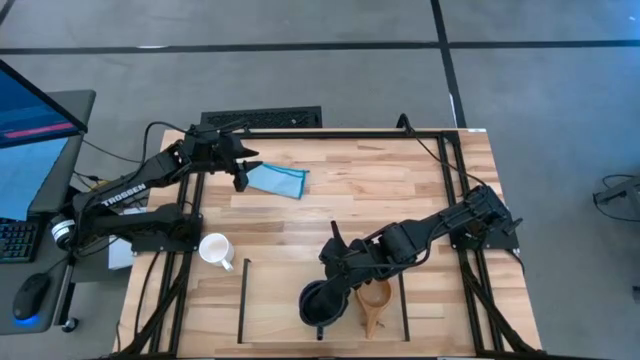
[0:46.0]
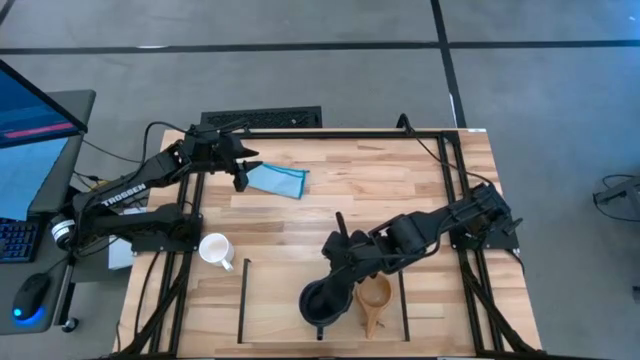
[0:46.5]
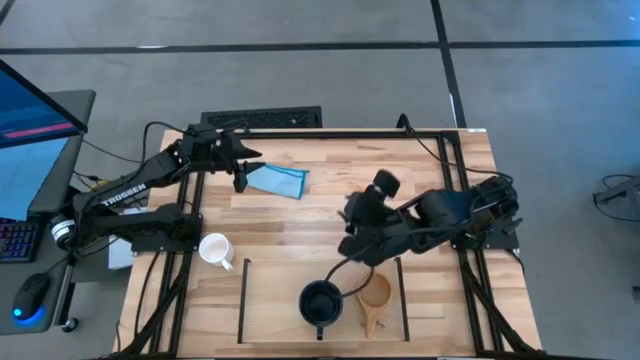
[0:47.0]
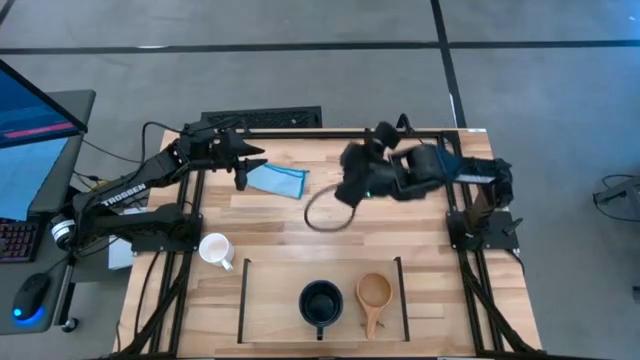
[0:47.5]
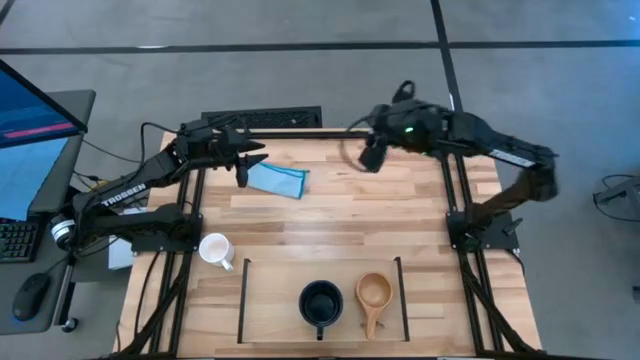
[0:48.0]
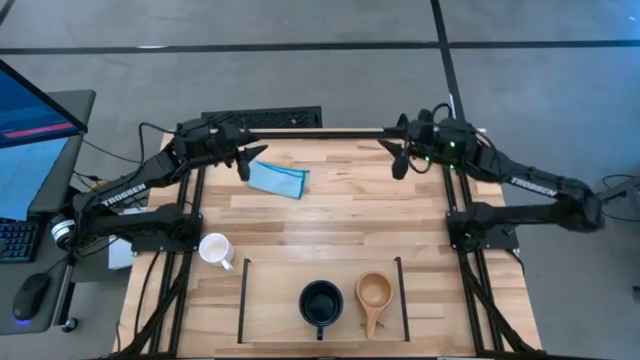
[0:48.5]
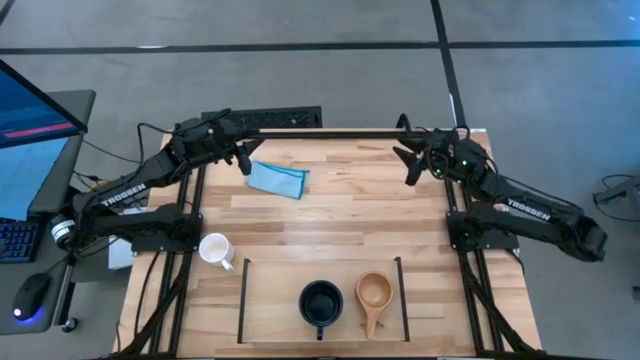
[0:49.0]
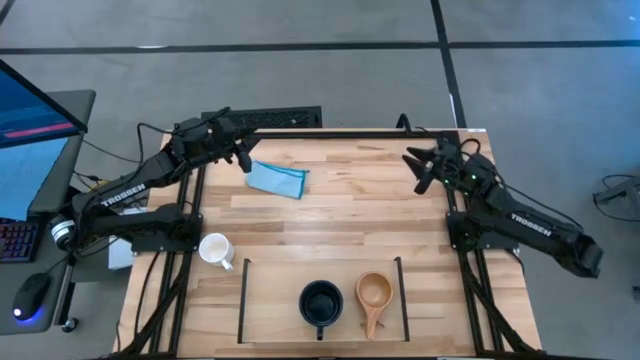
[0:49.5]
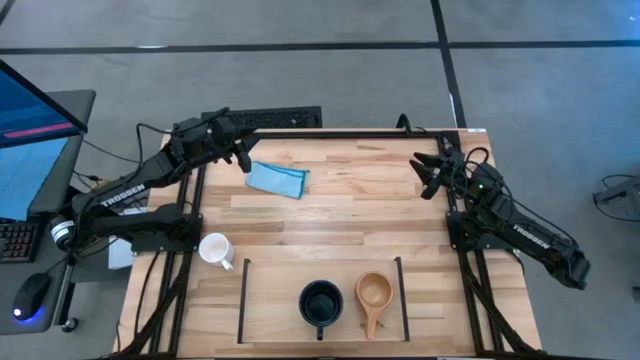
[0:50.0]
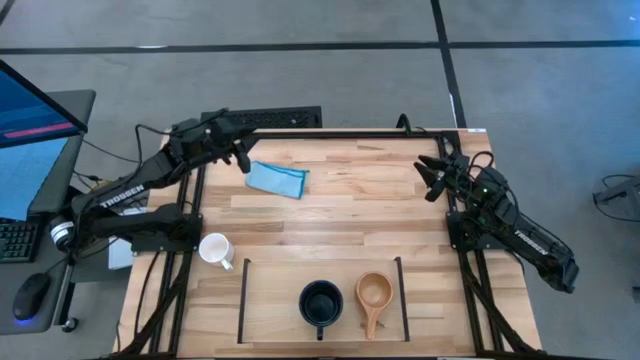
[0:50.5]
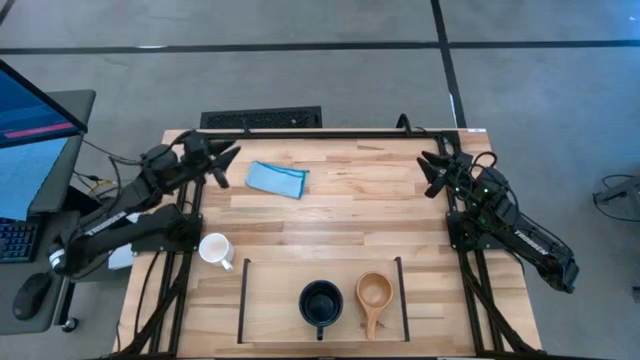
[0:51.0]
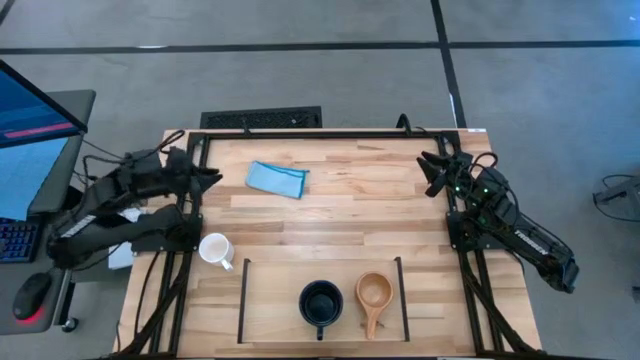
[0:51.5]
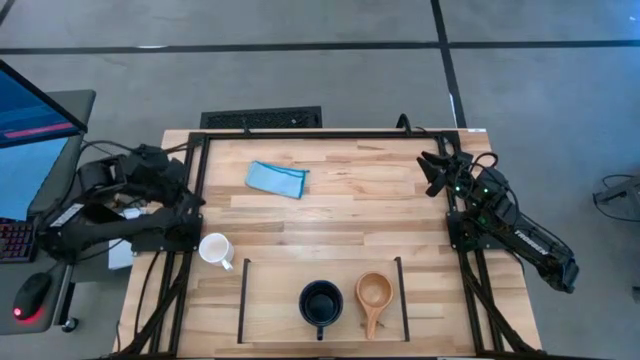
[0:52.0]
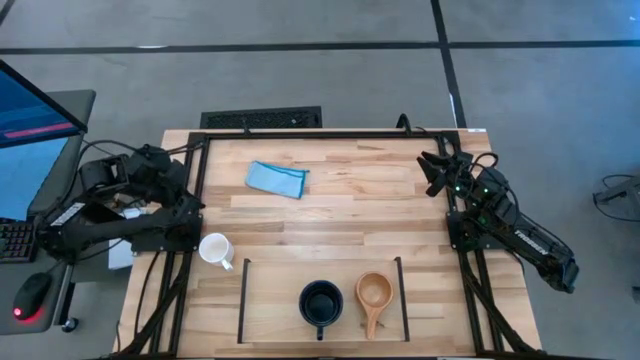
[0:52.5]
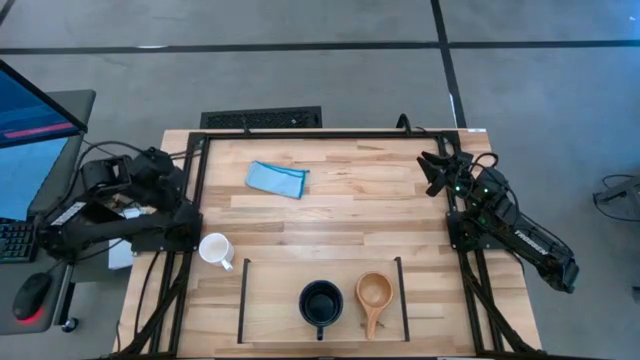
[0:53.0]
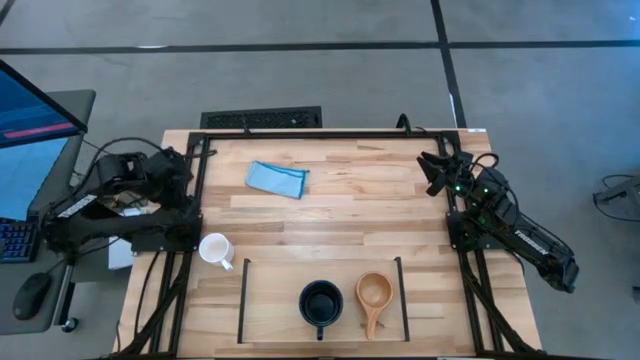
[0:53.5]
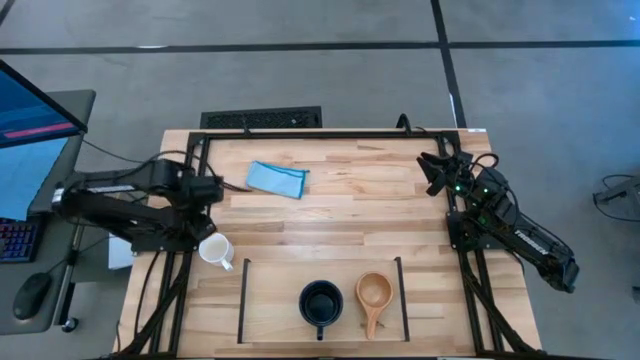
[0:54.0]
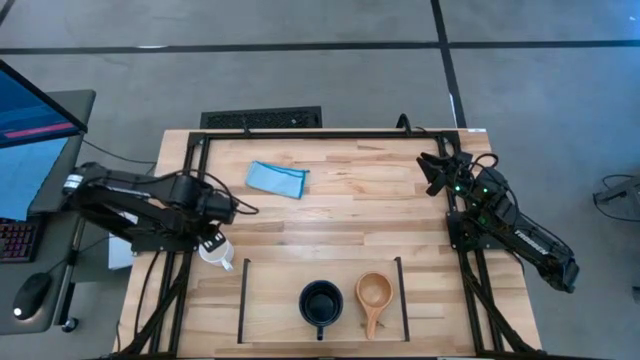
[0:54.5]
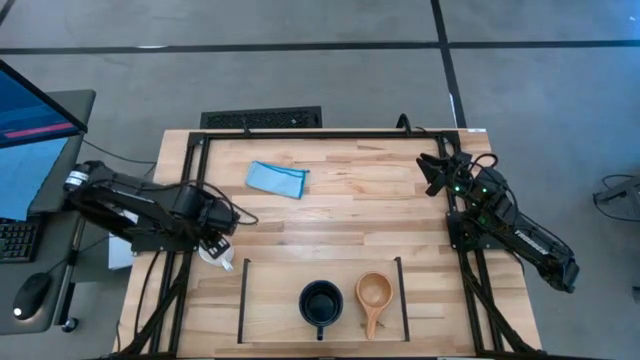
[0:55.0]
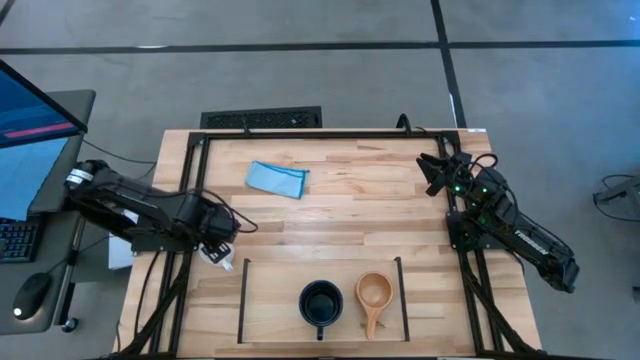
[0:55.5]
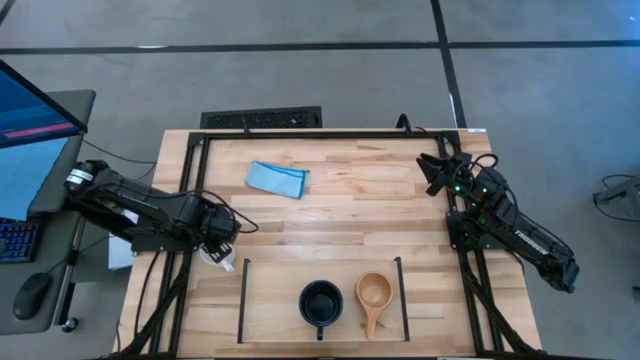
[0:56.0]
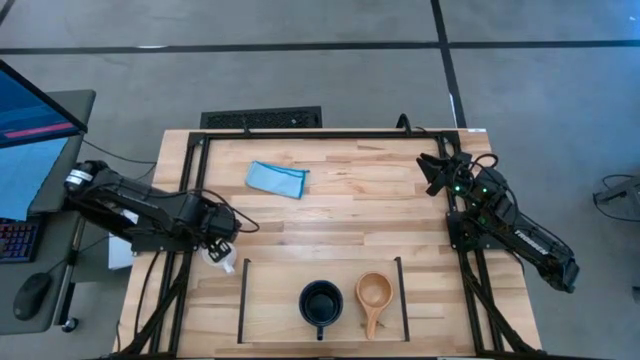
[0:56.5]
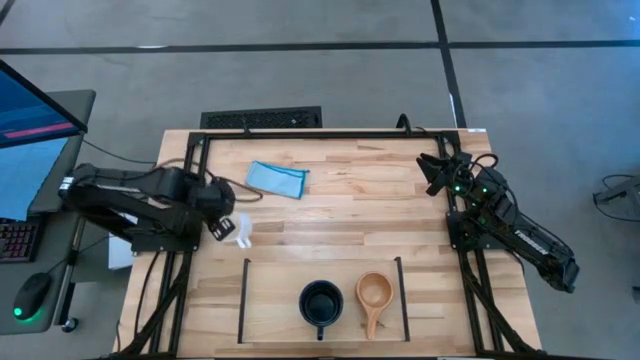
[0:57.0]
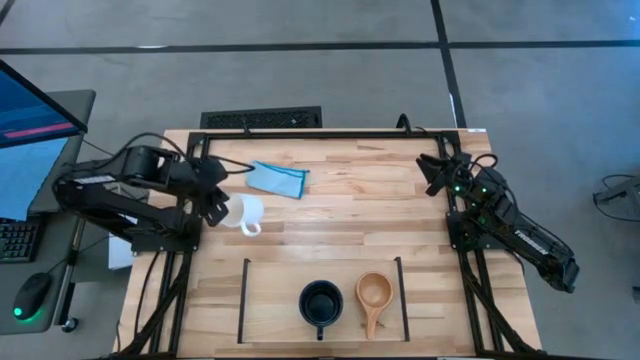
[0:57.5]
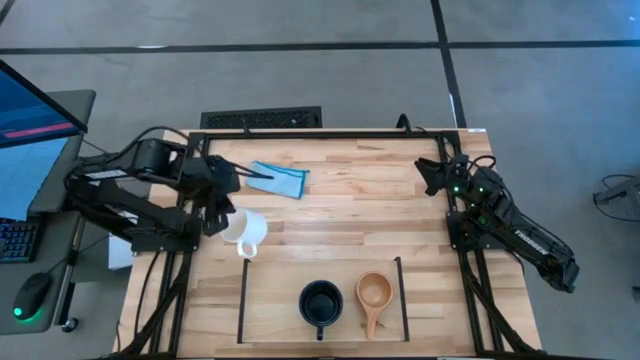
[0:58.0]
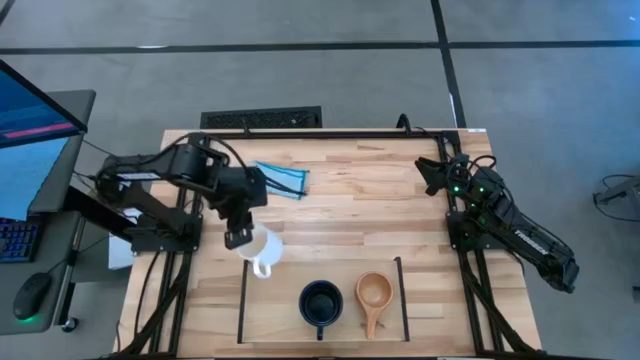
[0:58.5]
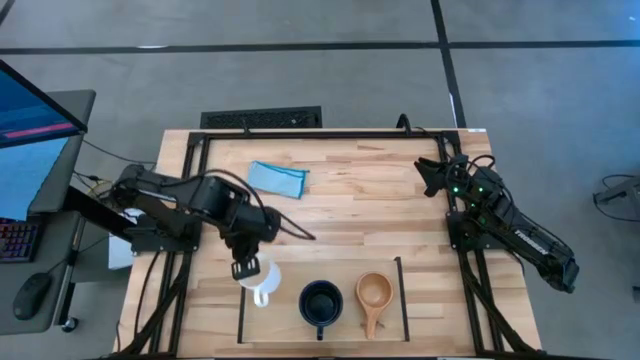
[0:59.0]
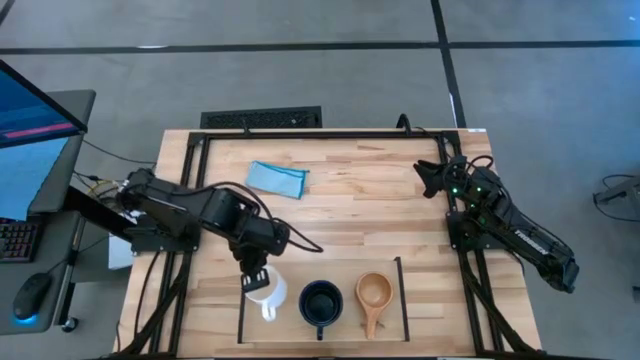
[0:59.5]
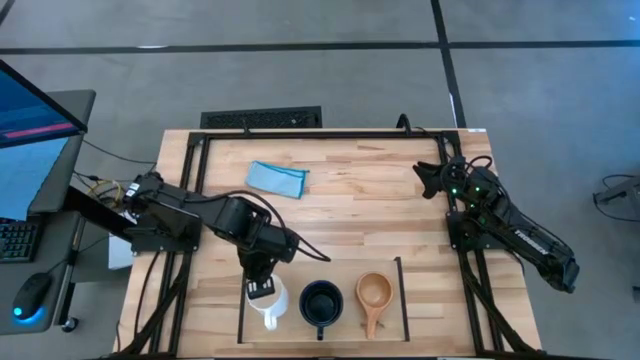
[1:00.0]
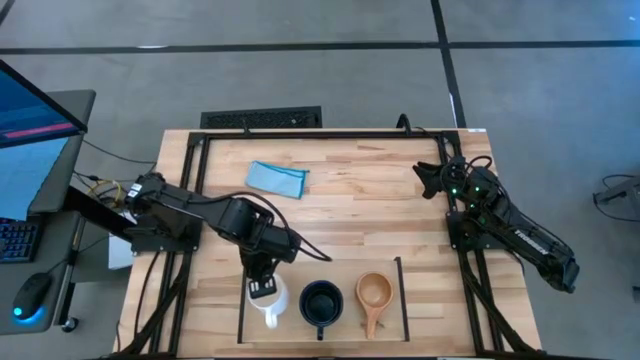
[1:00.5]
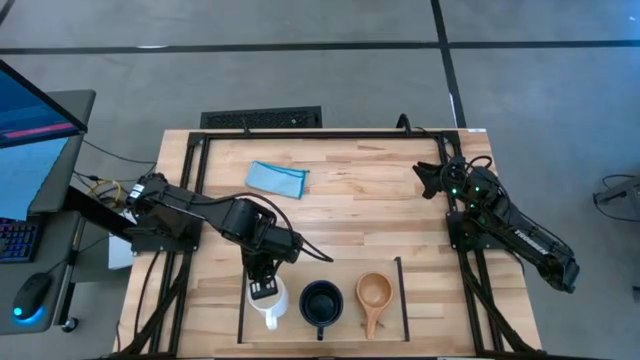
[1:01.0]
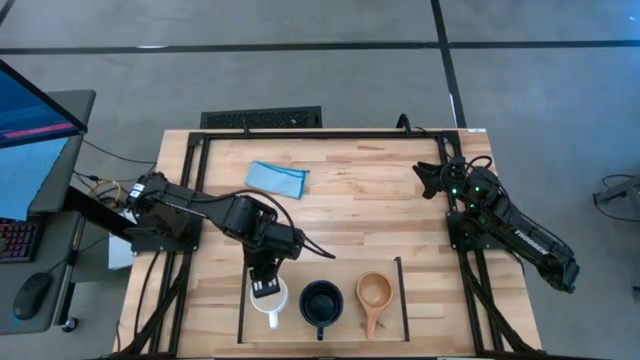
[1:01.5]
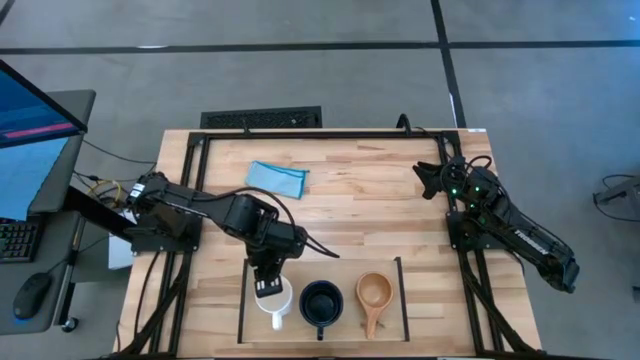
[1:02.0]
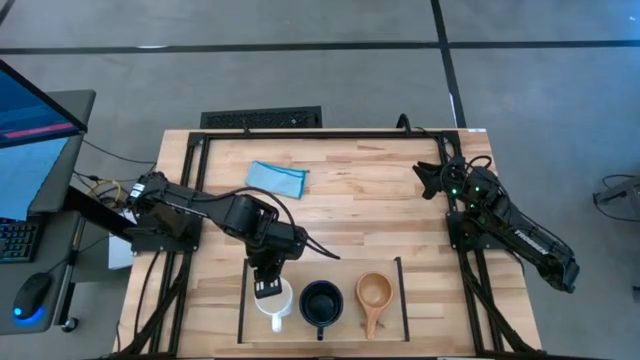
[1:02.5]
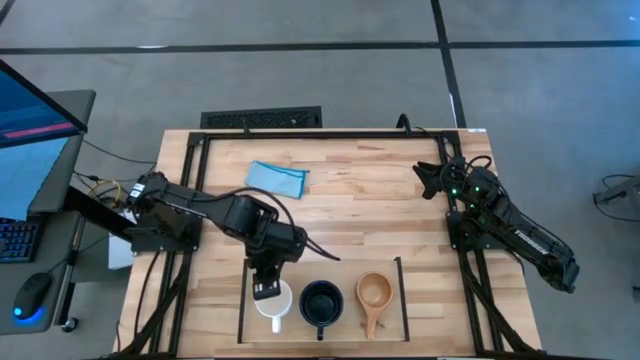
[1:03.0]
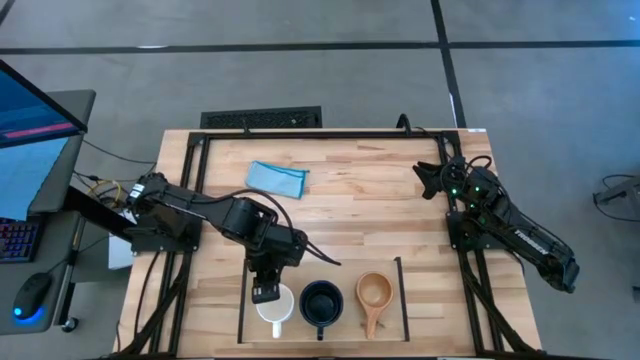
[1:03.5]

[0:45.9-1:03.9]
Task: Stack small to large cups/mugs on shelf
Put the white mug on the shelf

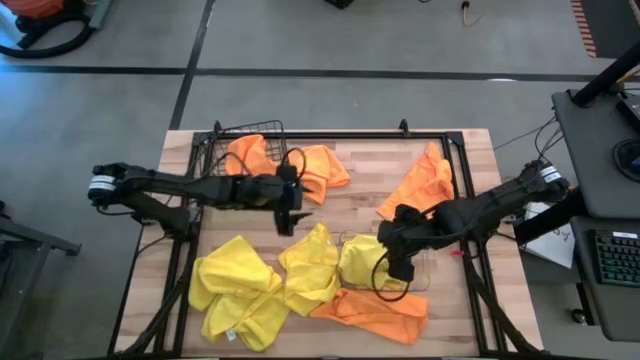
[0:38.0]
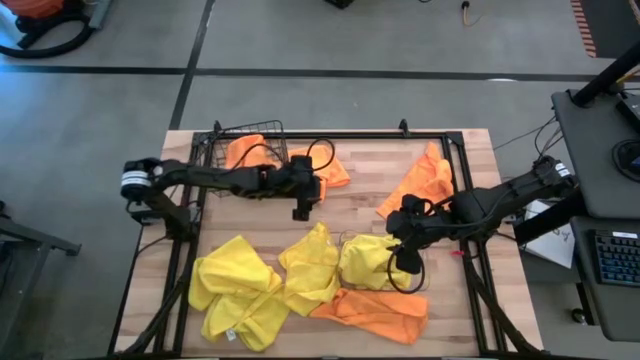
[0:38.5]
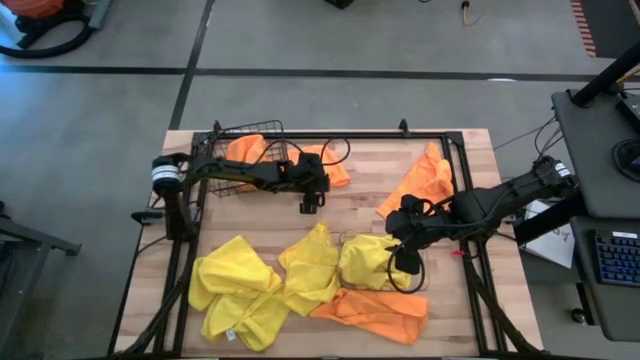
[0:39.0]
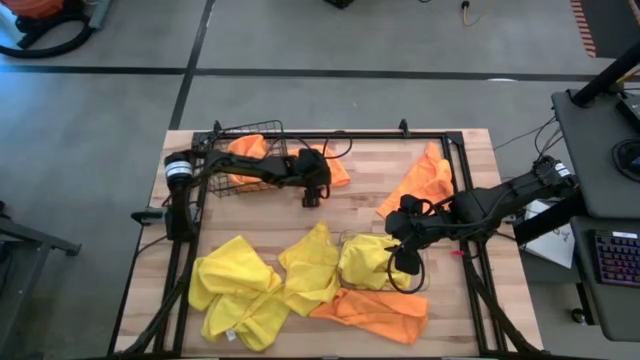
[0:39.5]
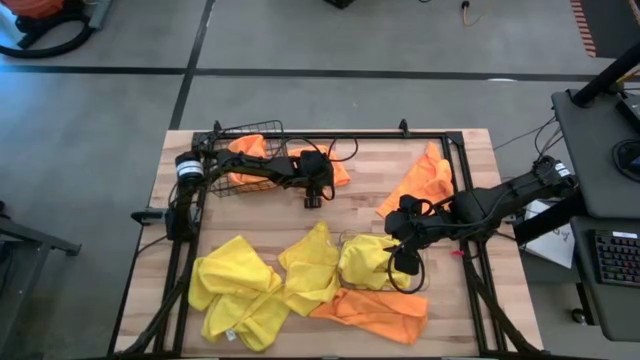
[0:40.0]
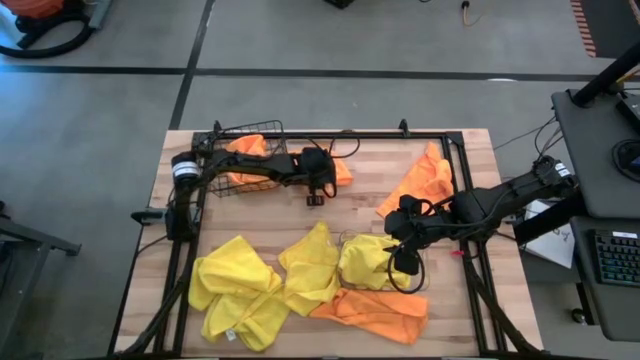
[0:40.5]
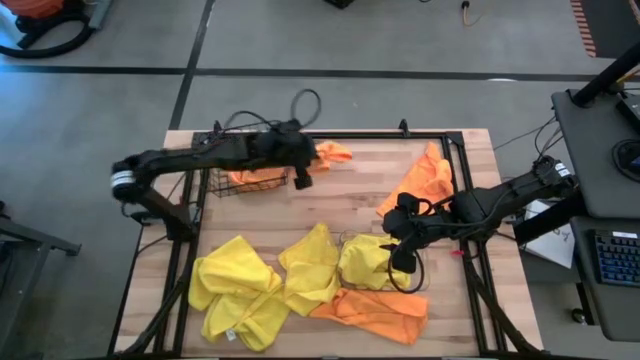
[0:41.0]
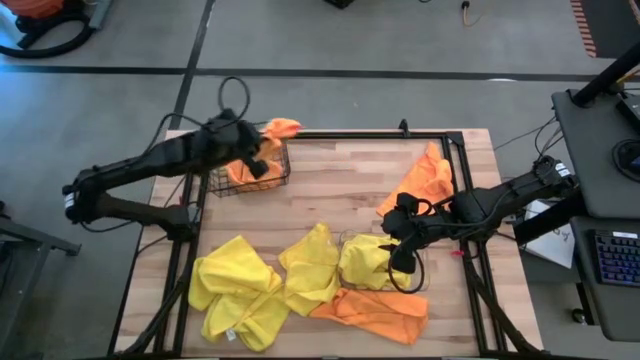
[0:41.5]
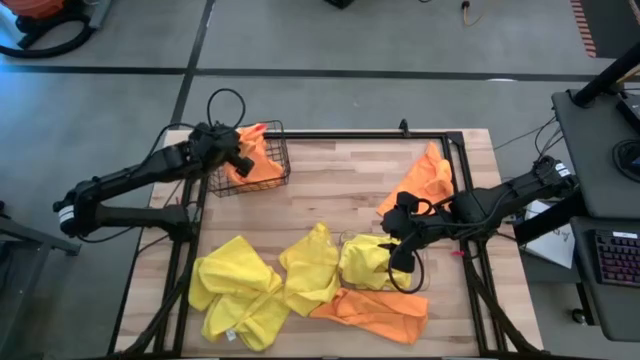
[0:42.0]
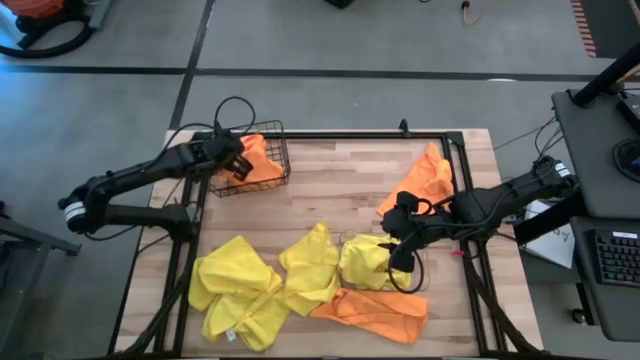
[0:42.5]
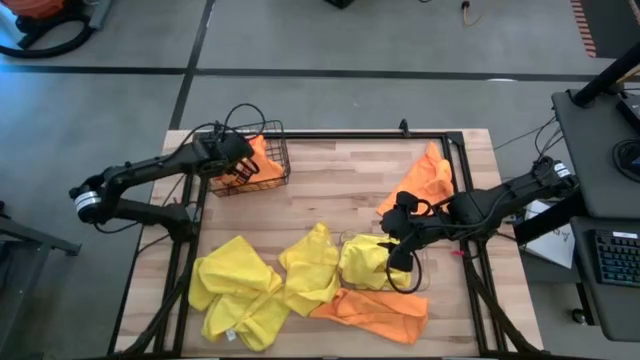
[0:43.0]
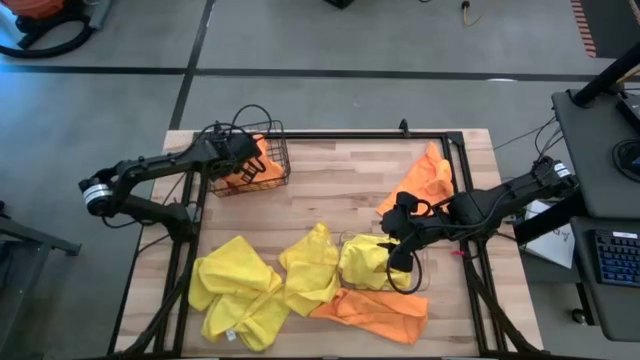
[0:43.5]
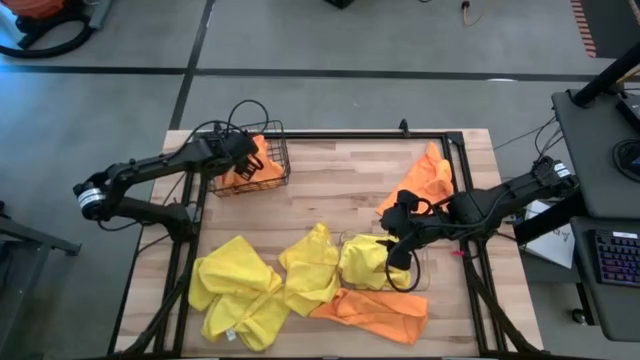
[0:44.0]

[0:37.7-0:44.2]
Task: Sort microfiber towel by color & place in baskets
Put the orange towel into the black basket
